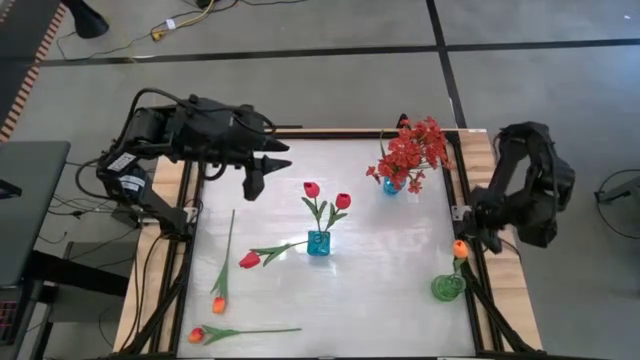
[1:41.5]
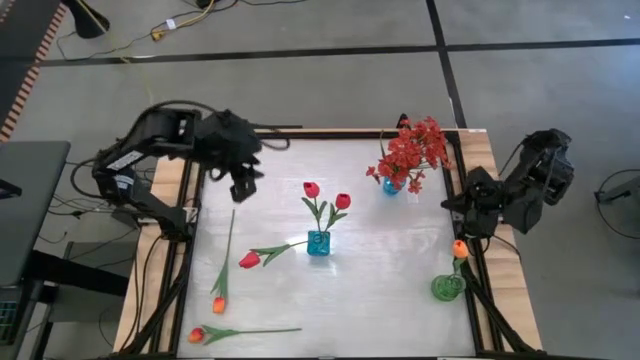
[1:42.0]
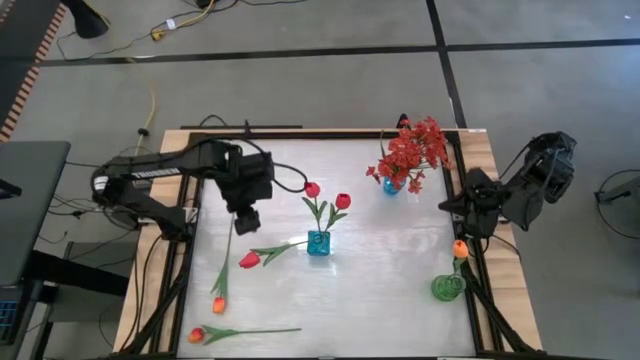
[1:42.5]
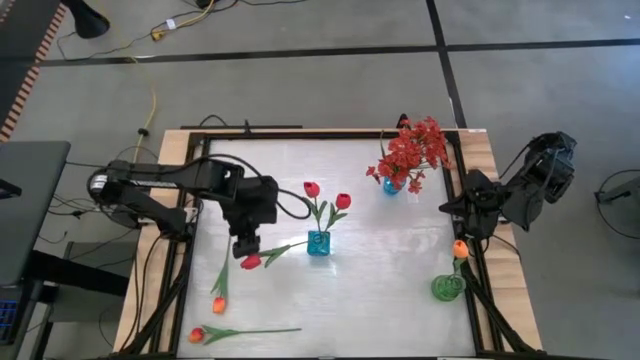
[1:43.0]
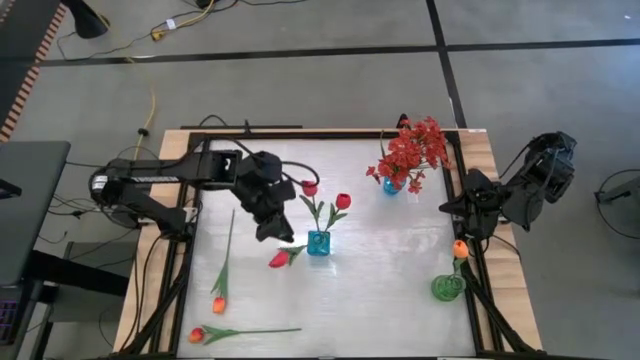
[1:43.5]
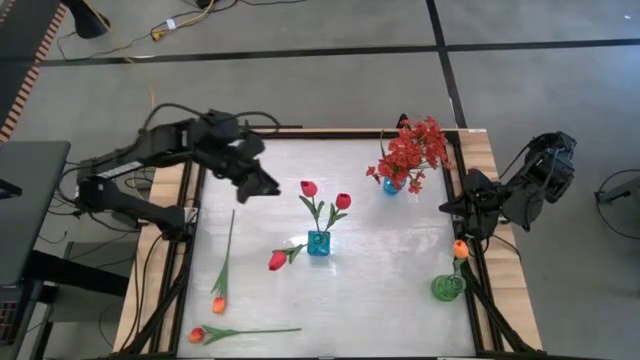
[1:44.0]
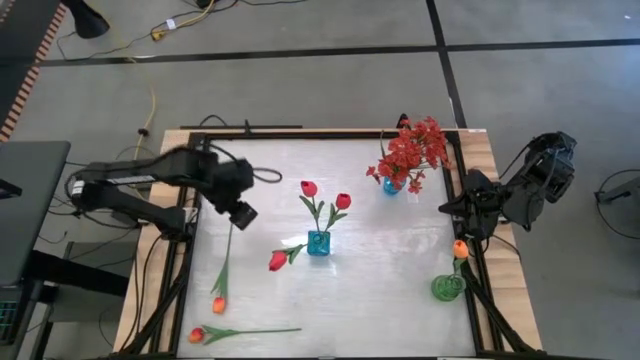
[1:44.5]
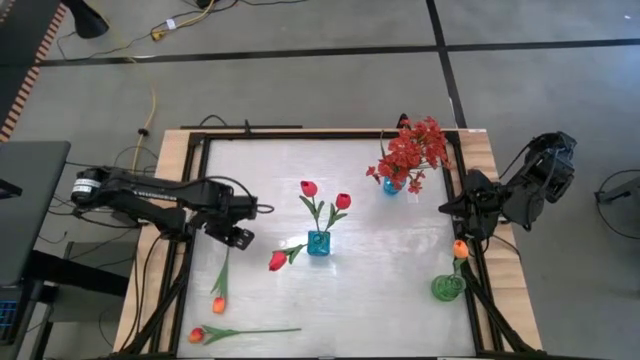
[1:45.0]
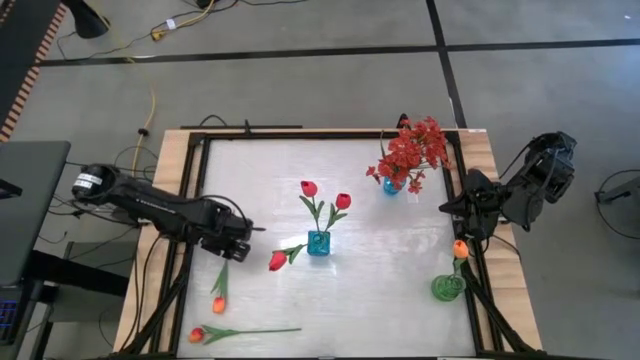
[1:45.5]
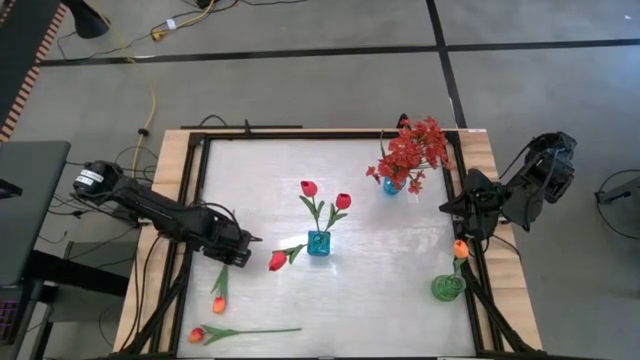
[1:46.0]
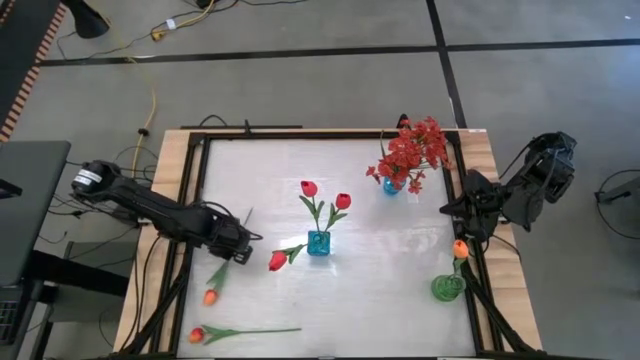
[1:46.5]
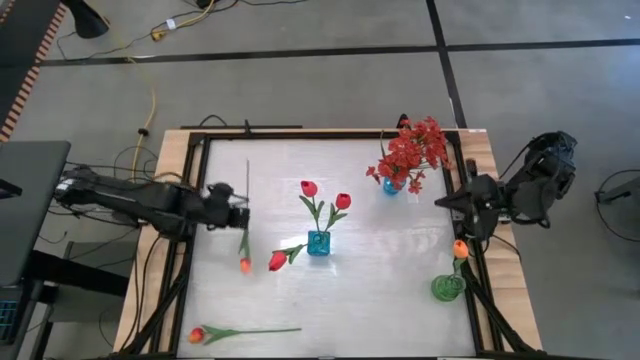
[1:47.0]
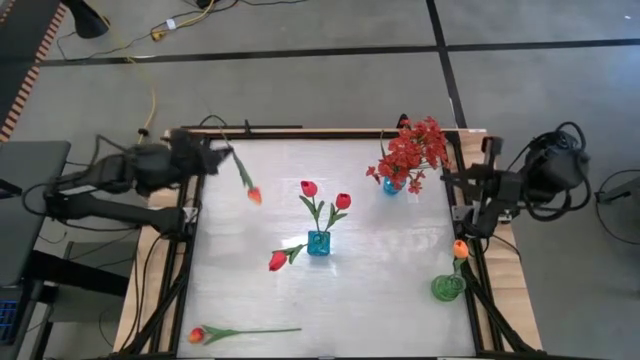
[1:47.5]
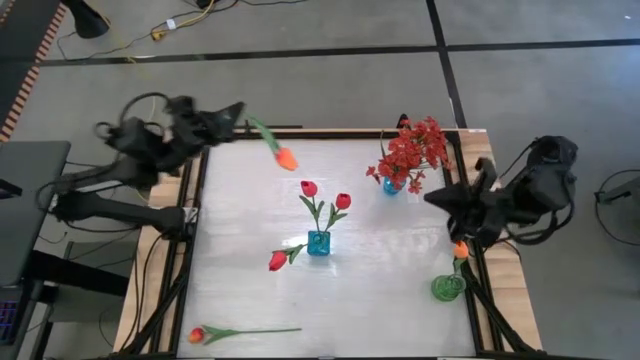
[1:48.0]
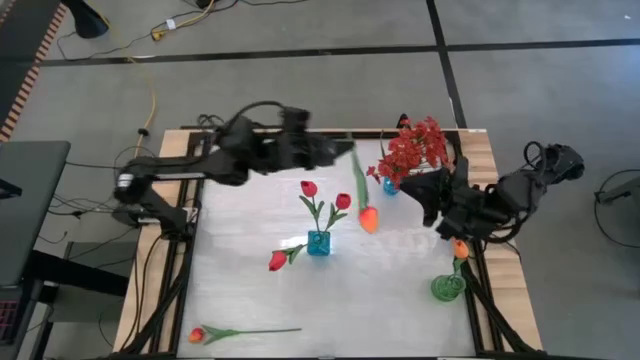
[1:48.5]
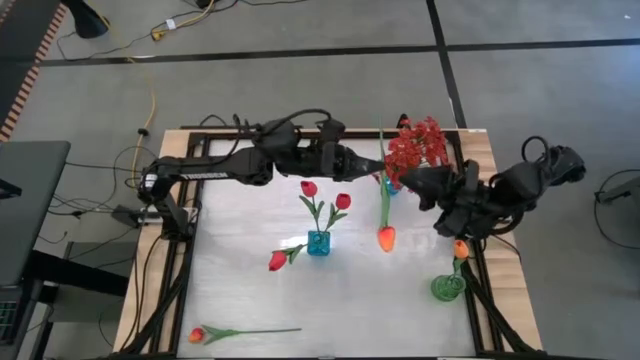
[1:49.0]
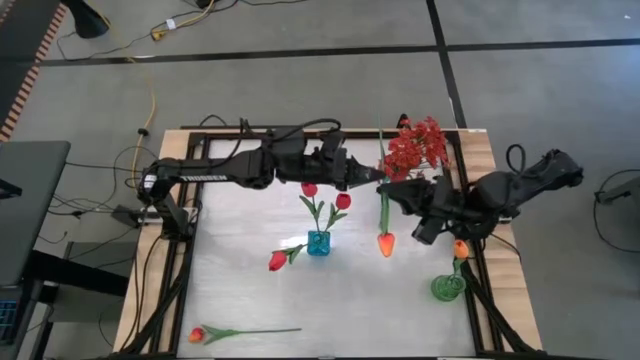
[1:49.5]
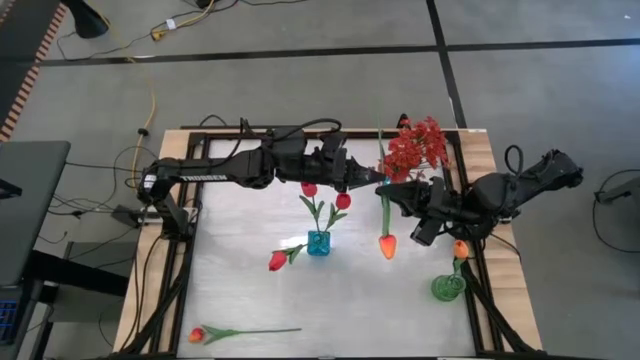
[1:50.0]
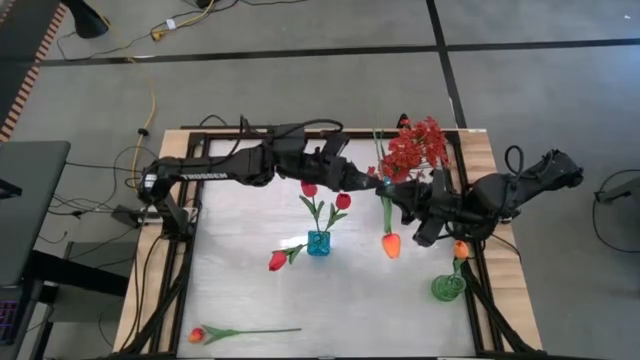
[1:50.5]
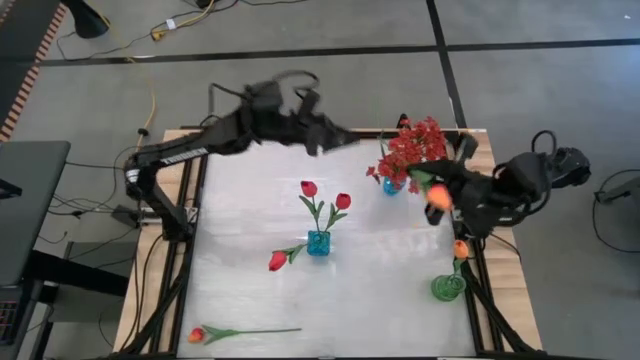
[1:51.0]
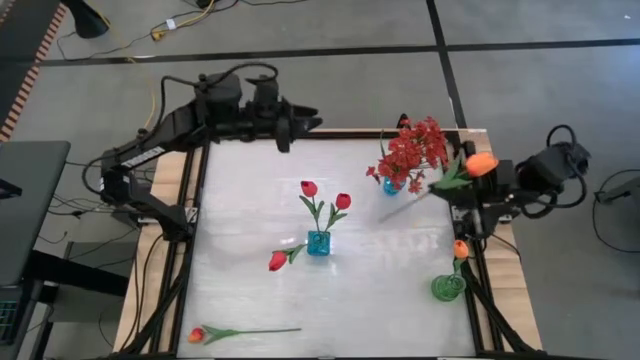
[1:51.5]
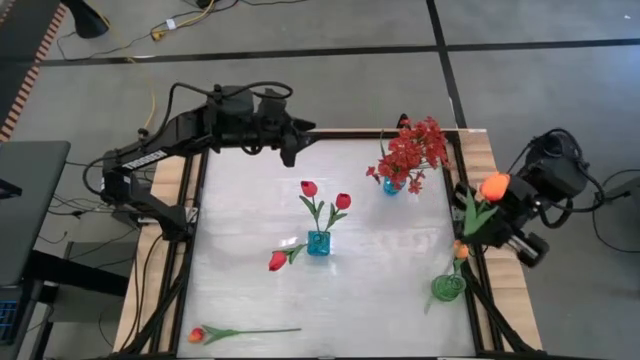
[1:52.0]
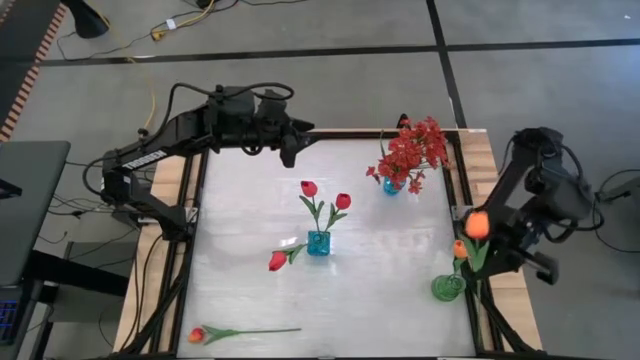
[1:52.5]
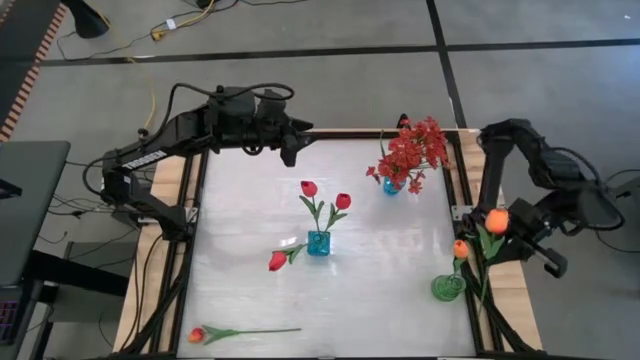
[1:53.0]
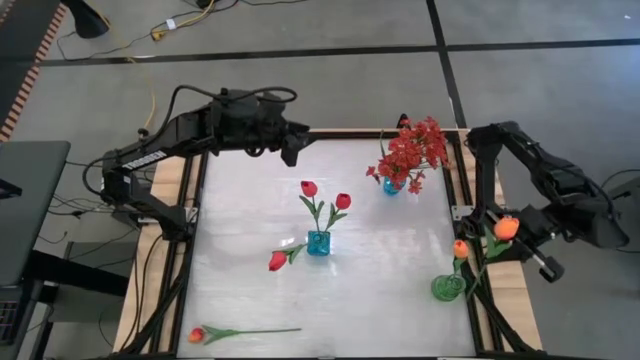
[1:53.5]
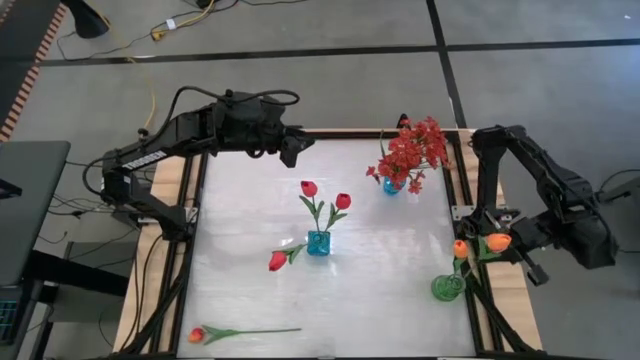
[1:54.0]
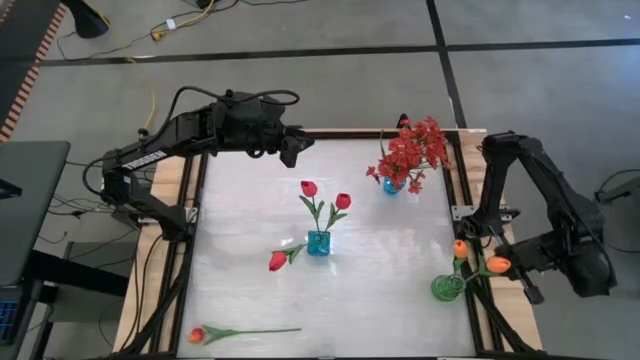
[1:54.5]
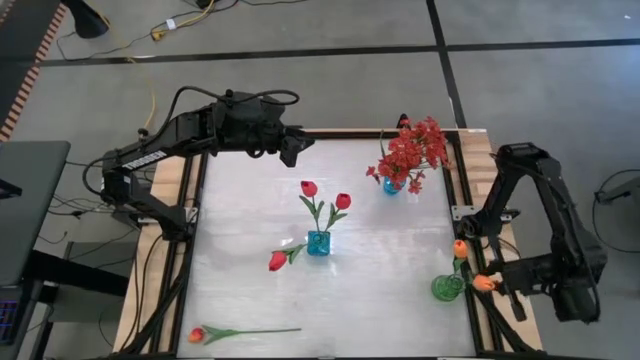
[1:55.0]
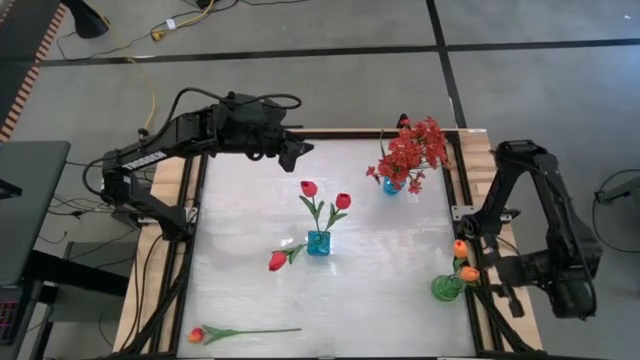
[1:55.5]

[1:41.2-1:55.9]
Task: Sort flowers into vase by color
Put the top orange flower into the green vase

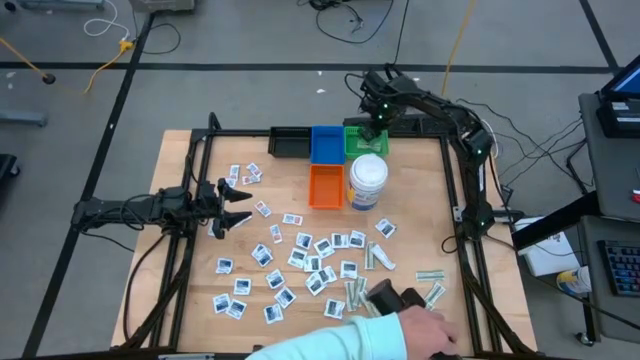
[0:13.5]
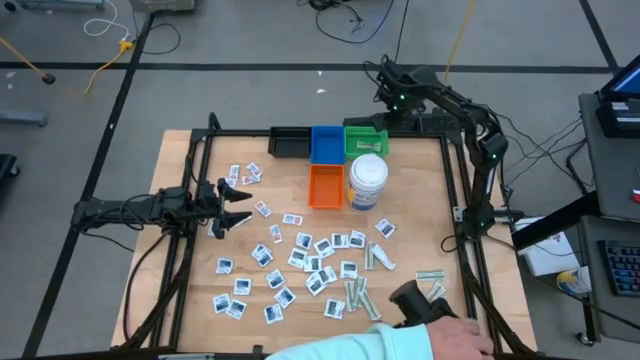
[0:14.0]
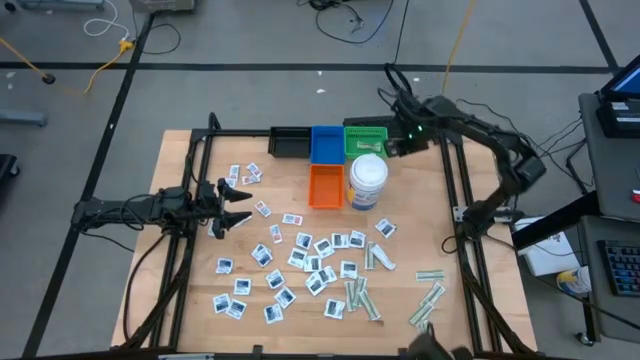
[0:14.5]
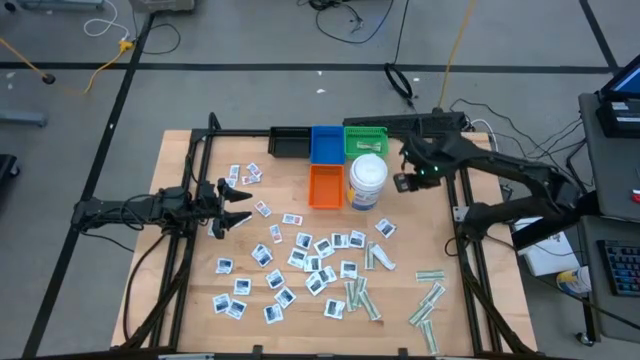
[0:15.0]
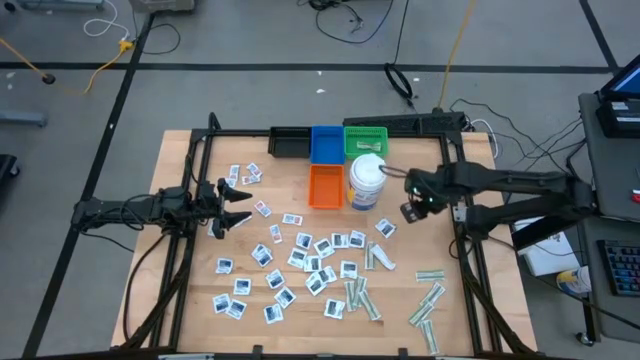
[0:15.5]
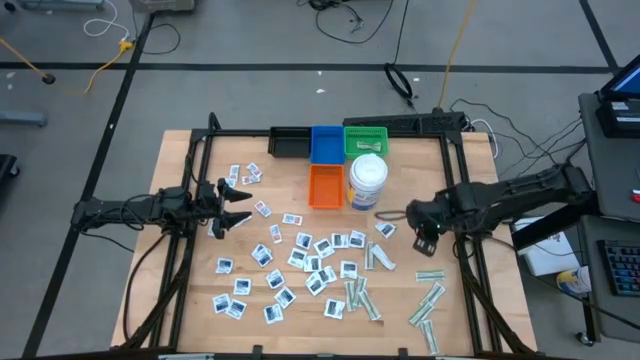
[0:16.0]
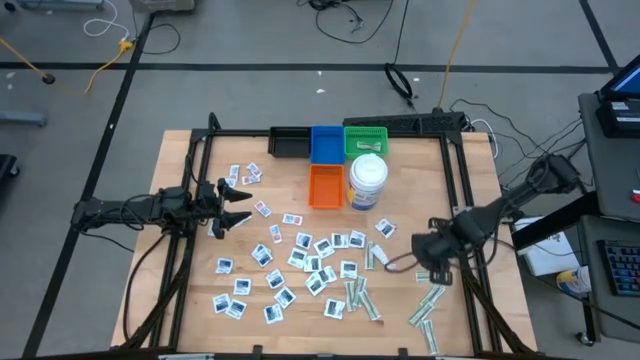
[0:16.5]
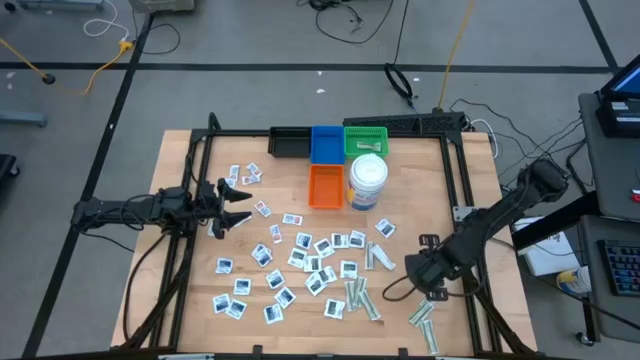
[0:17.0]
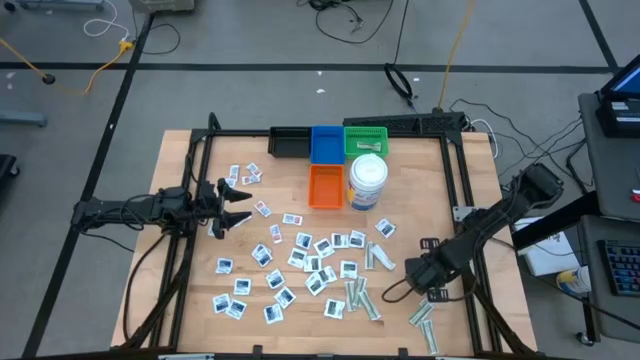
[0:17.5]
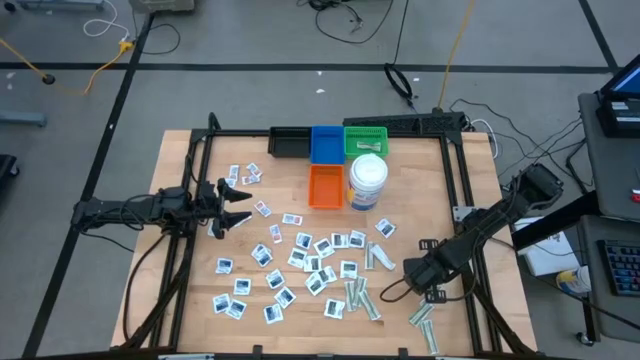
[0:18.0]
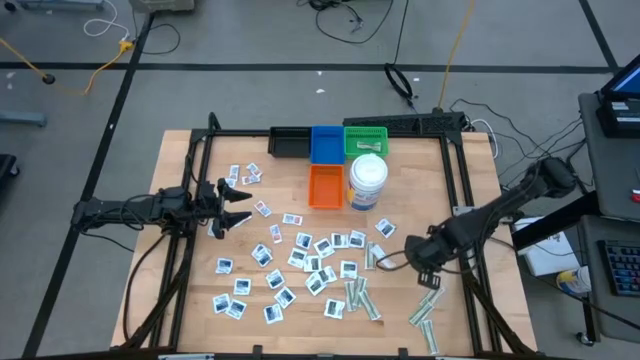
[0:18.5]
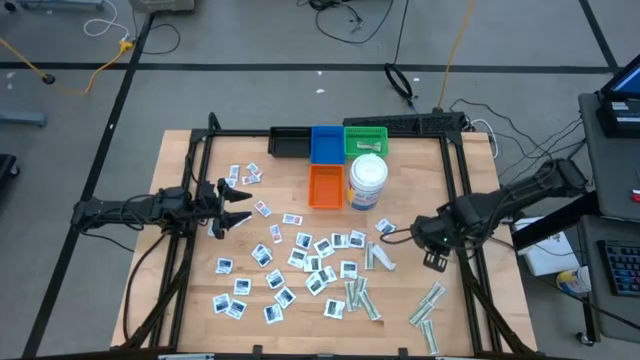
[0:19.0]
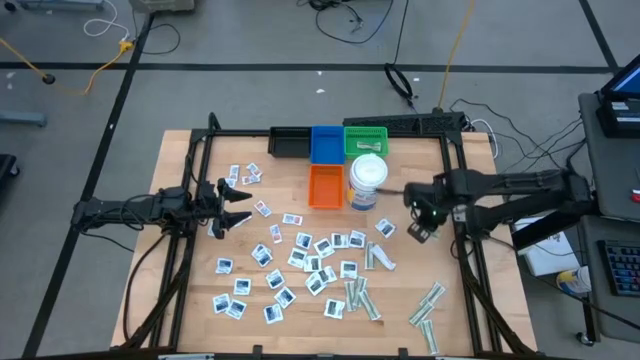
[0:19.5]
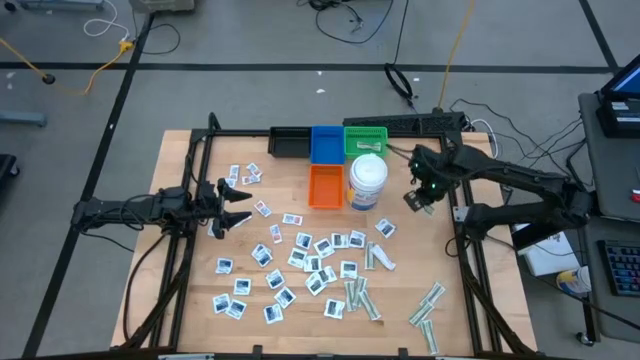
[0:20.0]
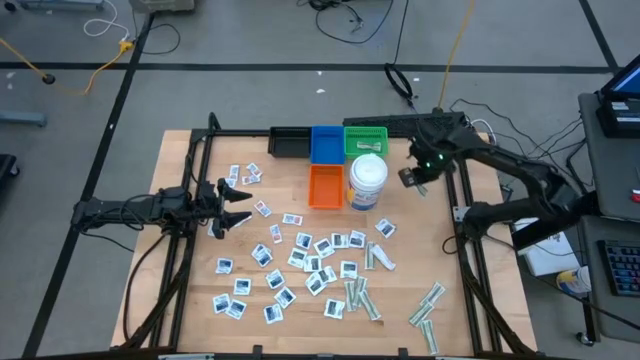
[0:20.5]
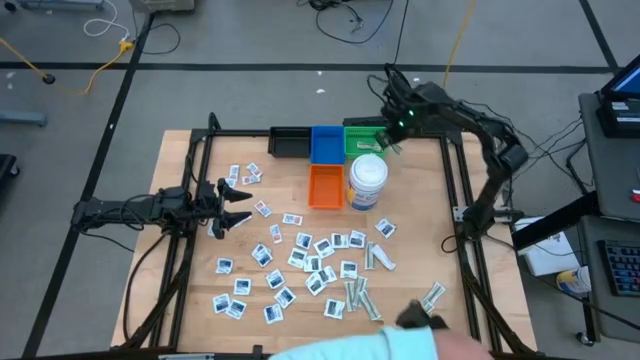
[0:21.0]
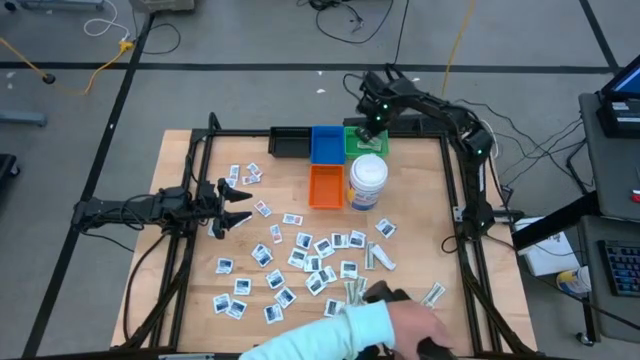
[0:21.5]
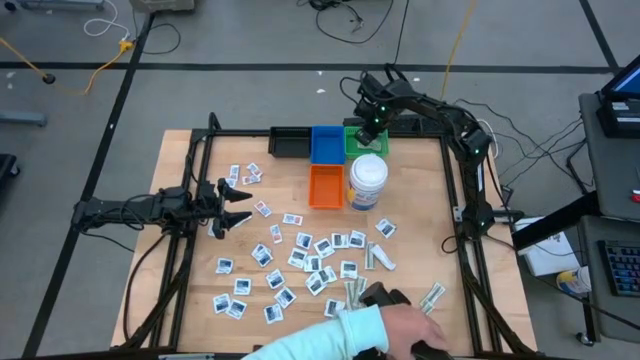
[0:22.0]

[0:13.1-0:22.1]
Task: Pick & Place First Aid Supplies
Put the green bandage pack into the green bin
